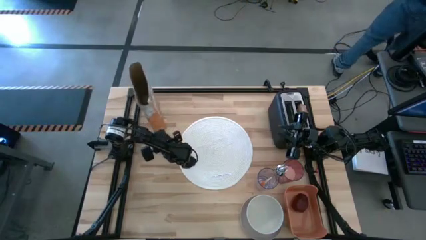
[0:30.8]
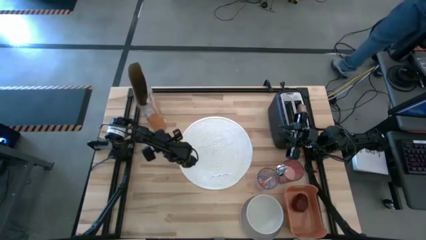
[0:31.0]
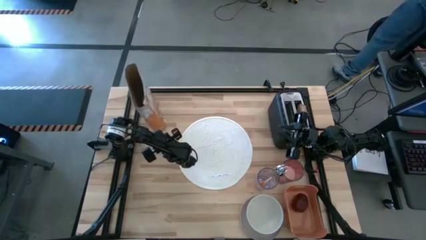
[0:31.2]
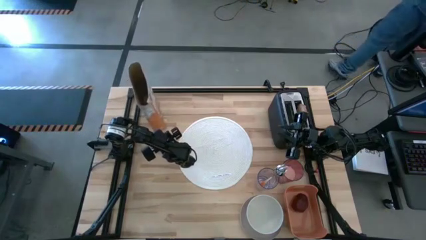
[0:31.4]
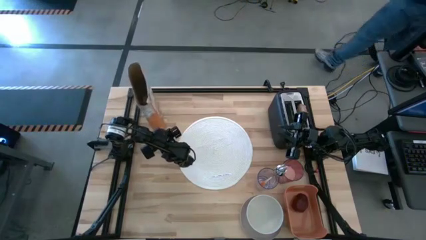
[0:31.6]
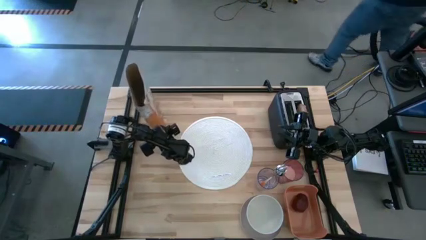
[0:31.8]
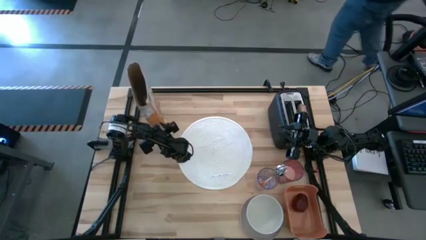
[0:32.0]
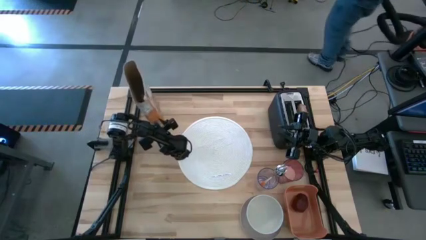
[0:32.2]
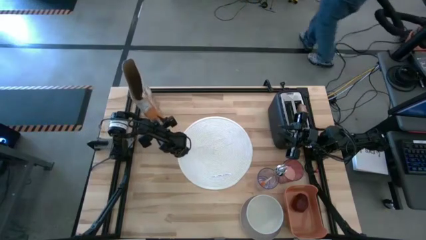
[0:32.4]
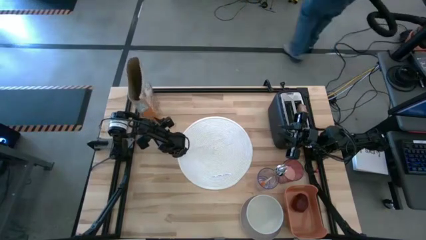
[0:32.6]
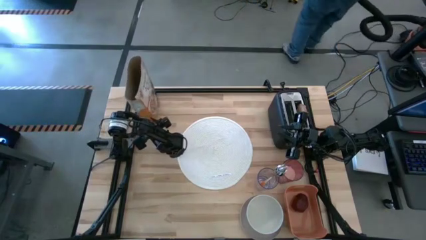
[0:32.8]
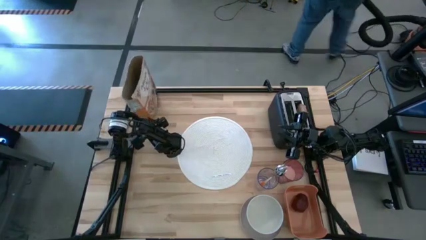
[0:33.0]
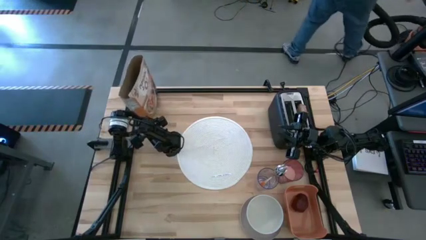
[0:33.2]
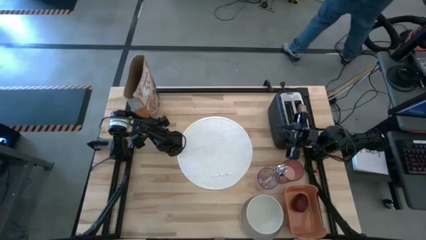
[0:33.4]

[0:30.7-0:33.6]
Task: Arrange a breakfast setting
Move the cereal to the top left of the table

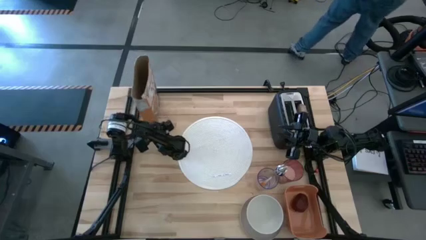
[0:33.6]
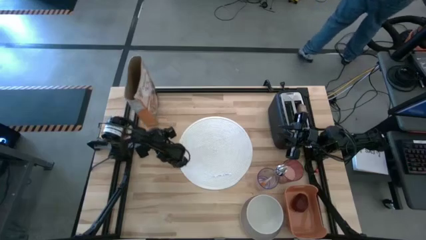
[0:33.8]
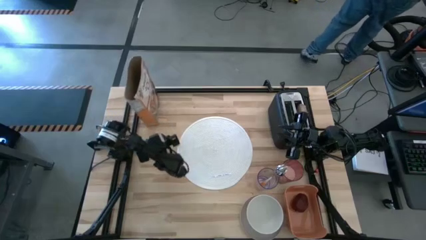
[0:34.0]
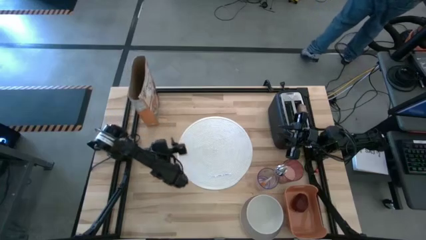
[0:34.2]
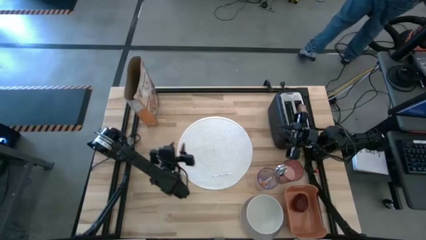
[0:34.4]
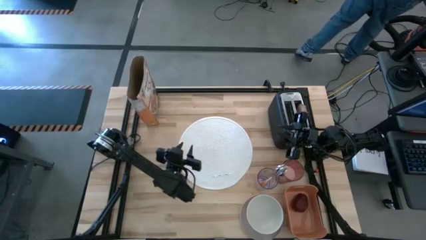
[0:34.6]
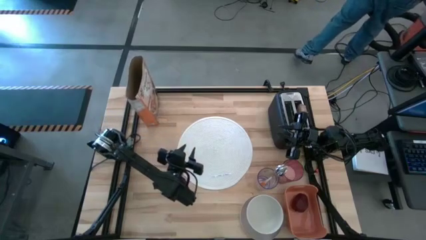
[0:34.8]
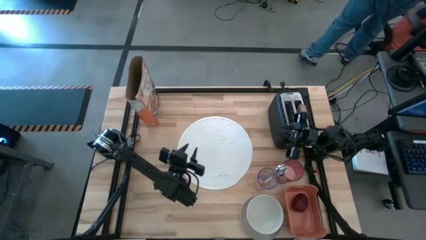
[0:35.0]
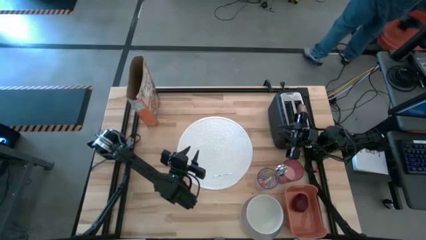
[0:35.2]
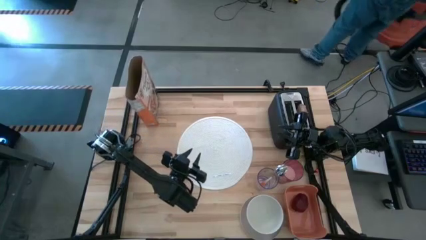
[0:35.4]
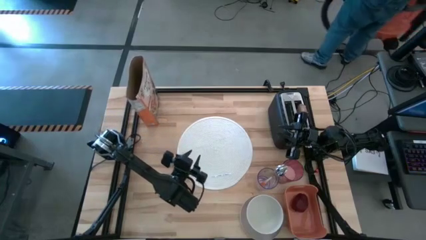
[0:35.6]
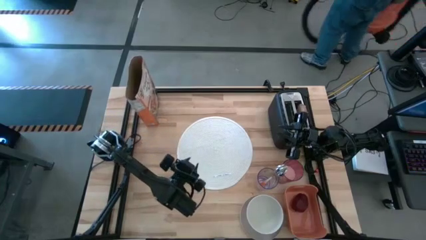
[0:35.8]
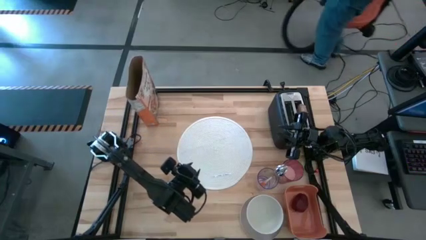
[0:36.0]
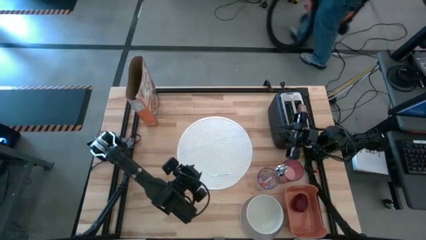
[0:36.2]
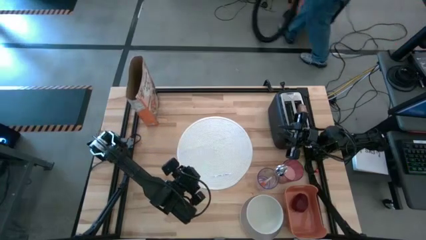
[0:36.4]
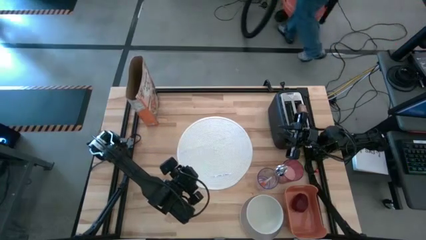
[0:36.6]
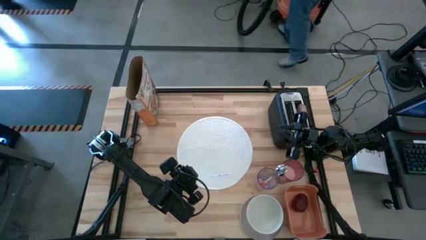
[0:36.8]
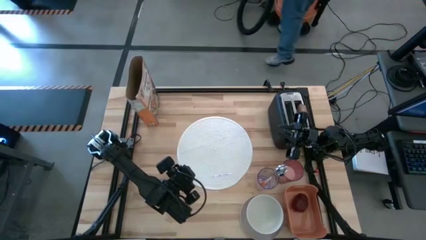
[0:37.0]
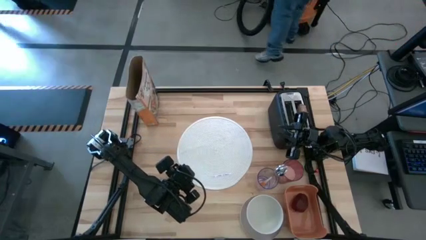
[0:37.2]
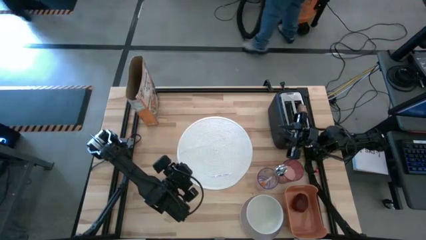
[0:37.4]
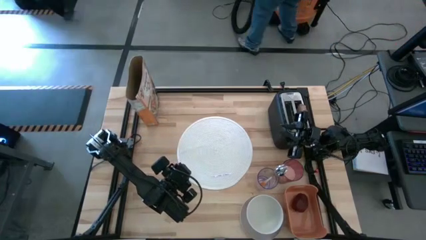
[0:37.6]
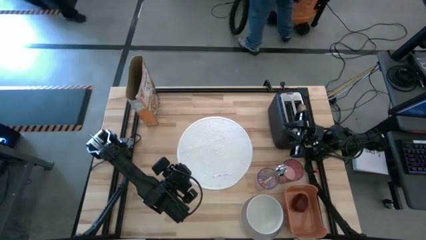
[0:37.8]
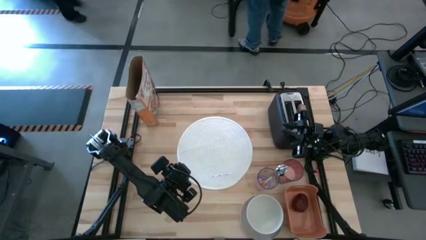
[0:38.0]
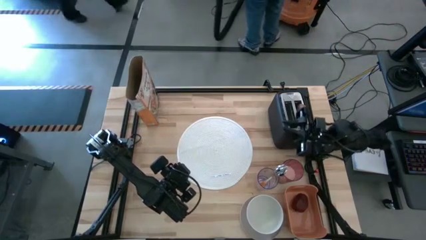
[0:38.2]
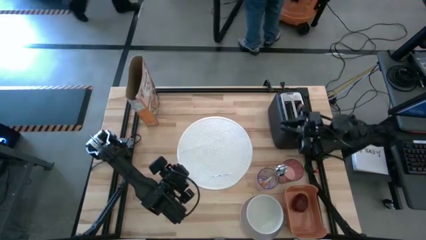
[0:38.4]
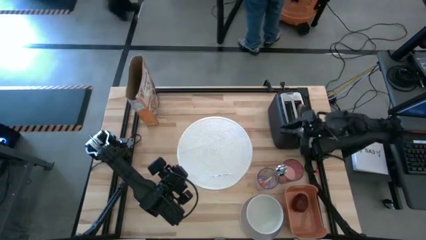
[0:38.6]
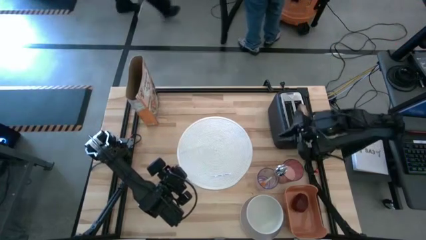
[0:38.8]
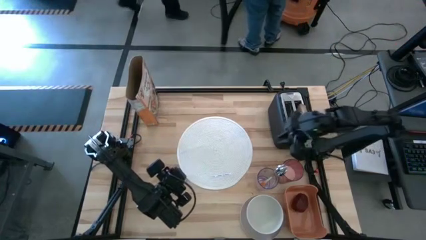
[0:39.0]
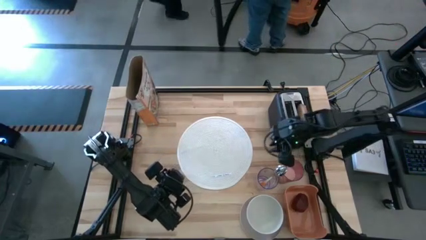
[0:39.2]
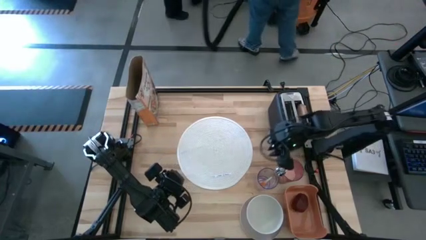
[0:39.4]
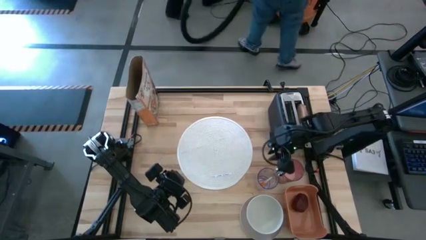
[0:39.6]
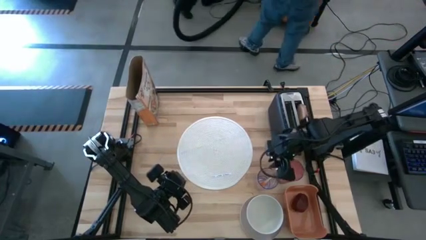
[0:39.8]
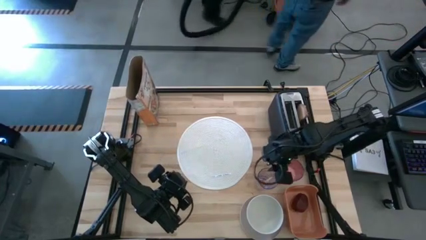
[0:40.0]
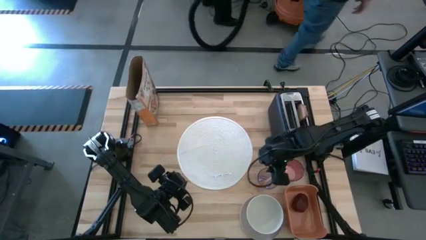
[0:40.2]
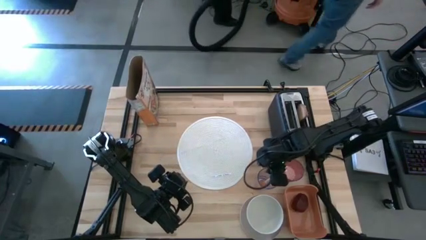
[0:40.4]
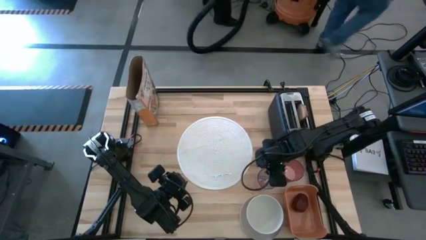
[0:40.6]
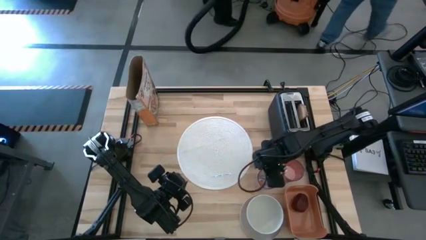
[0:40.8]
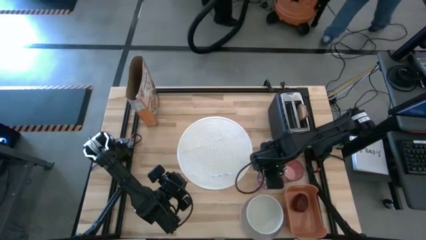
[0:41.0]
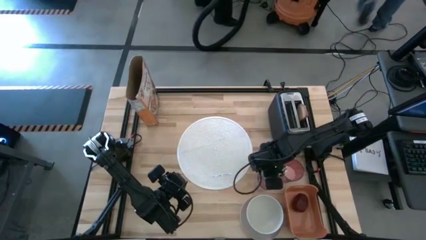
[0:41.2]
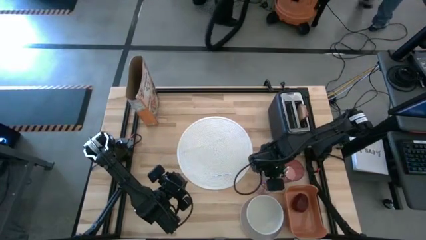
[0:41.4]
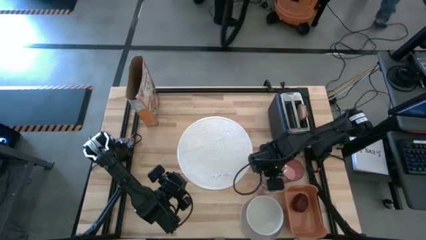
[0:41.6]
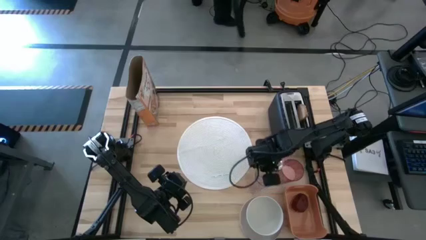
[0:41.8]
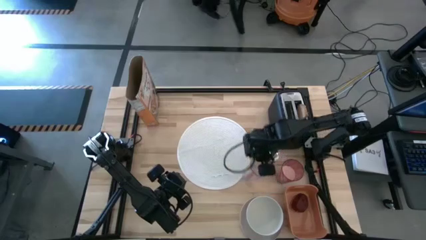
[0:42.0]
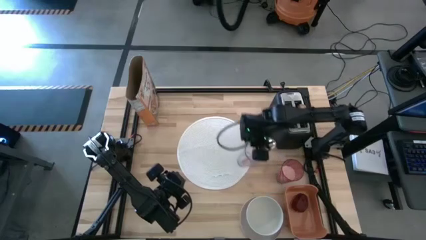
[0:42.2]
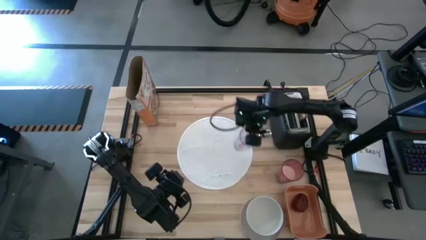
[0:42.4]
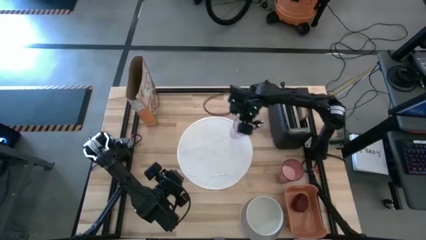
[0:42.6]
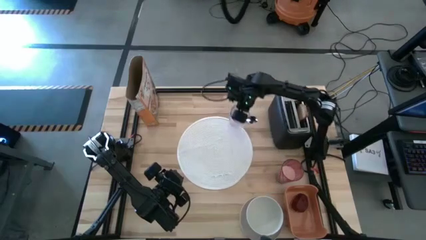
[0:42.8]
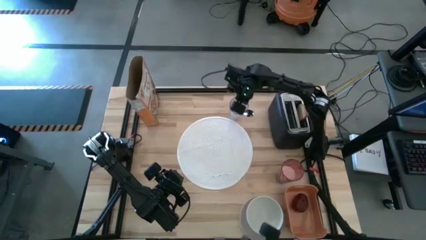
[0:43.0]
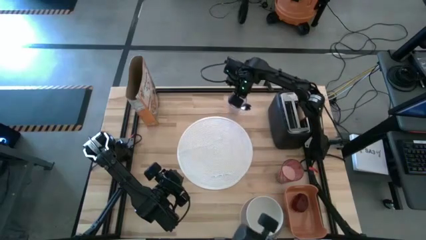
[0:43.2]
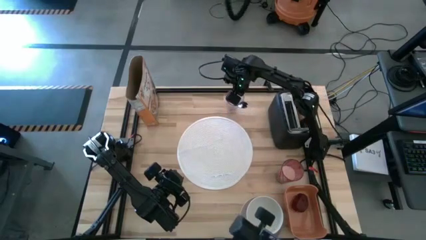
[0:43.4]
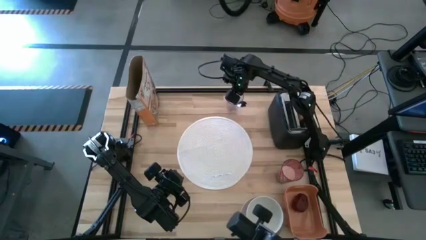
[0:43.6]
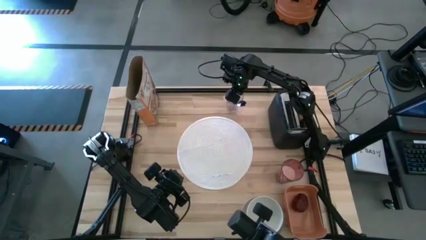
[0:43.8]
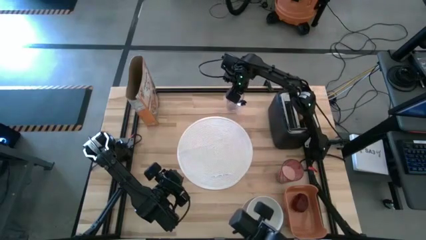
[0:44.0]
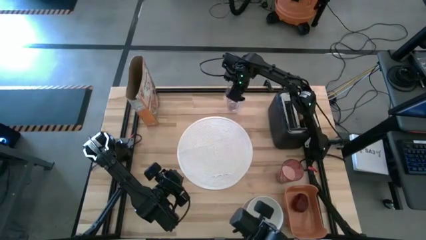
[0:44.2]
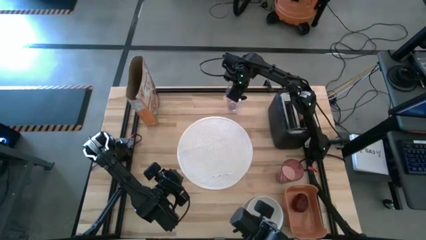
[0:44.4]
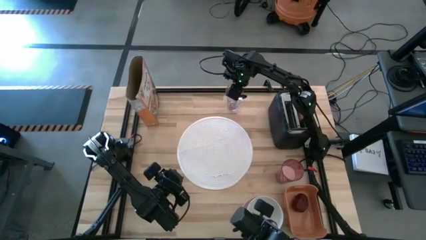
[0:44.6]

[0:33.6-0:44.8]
Move the purple cup with spoon to the top of the table

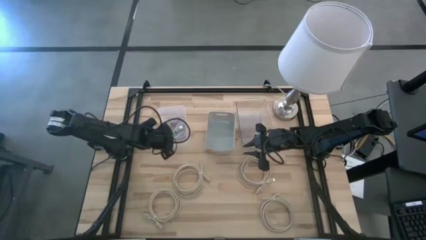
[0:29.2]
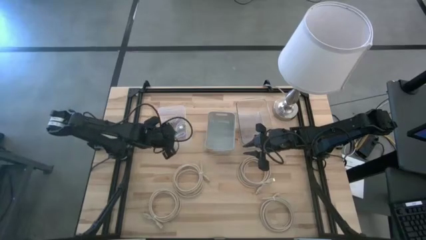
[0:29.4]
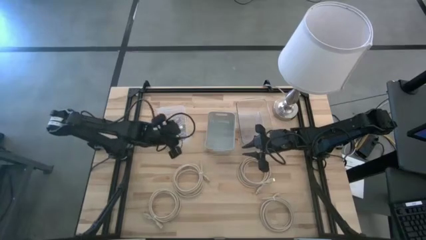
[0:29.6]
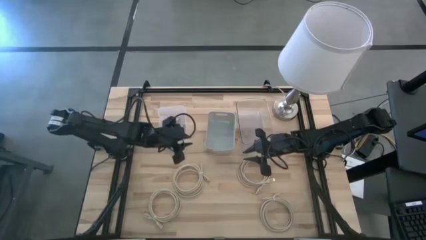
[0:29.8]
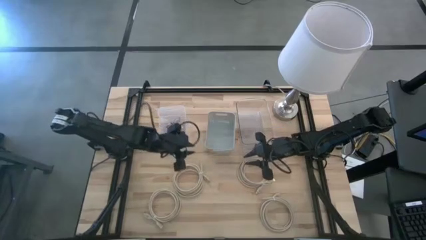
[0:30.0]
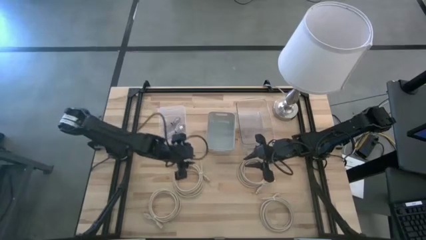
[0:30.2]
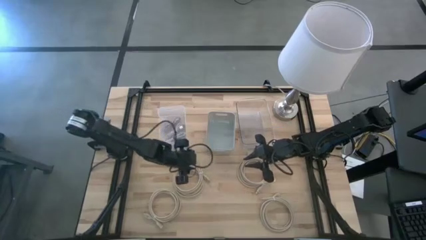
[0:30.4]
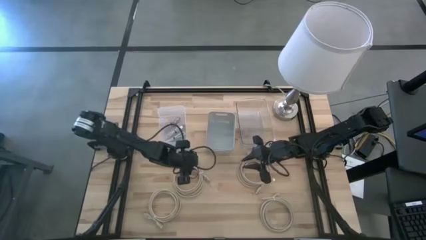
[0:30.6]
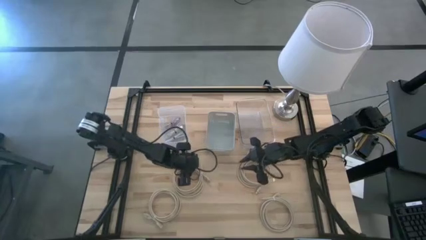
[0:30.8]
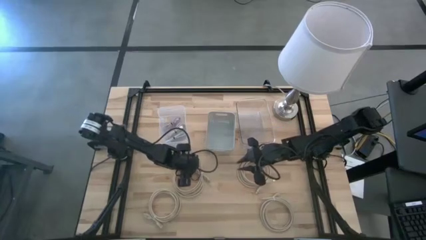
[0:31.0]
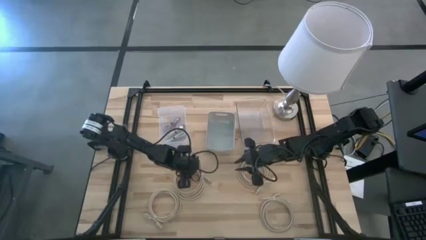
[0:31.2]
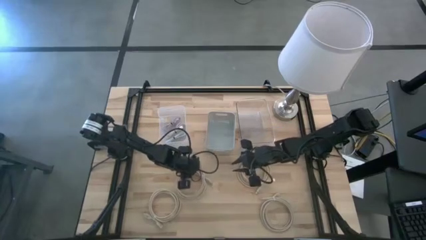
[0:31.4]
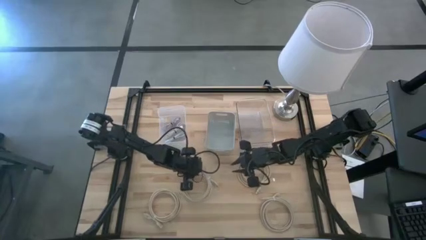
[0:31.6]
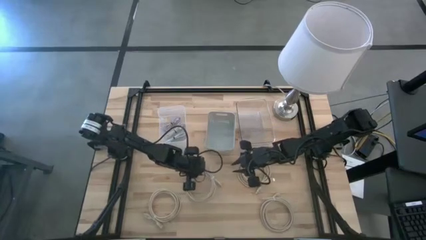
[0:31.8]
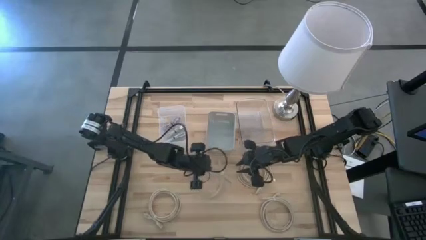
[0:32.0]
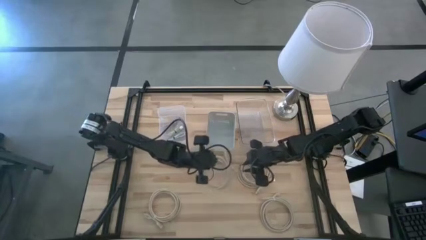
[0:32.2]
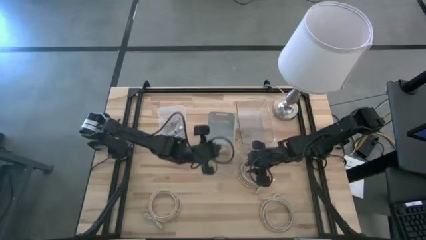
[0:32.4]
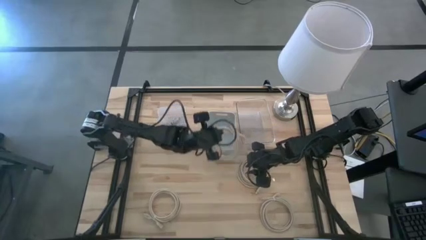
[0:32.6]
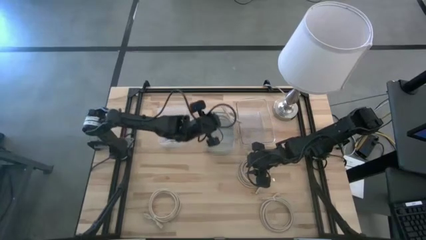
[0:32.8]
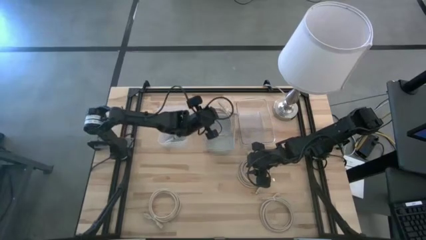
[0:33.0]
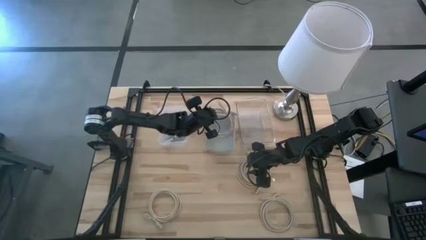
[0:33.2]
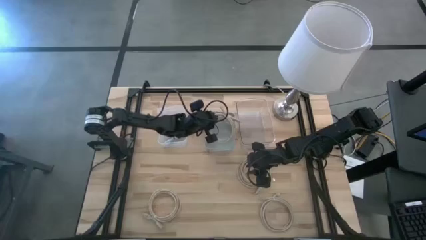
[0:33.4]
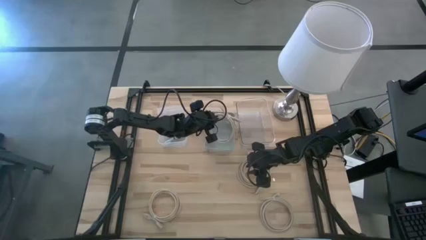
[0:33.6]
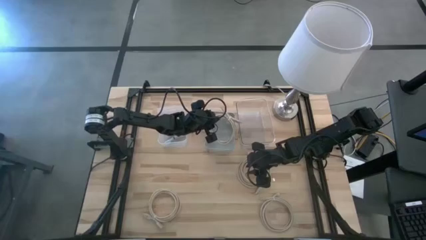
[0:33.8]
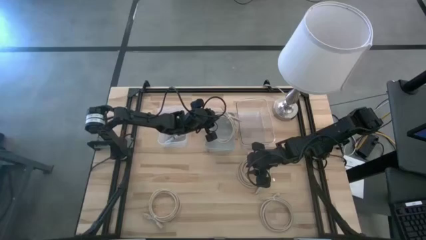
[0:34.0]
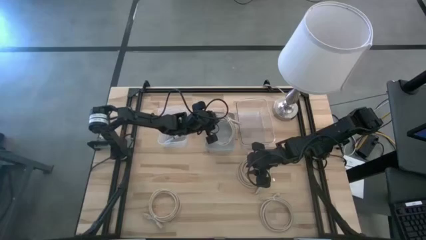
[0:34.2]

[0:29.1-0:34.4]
Task: Pick & Place USB Port
Put the brown hdmi cable into the white bin
